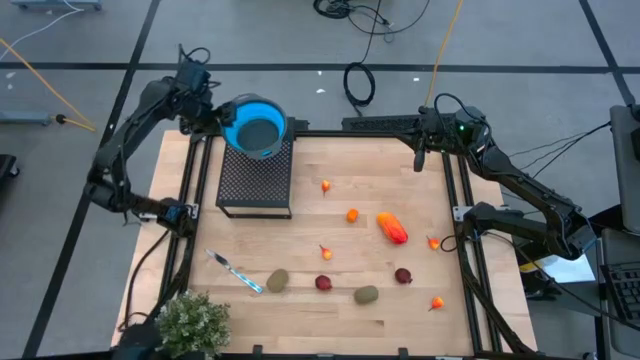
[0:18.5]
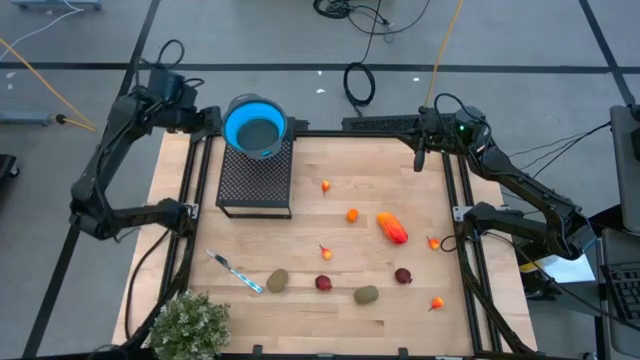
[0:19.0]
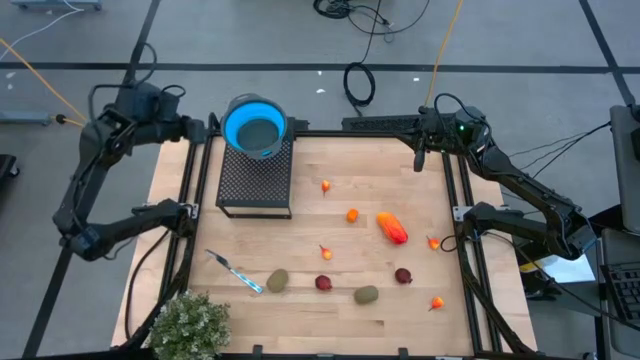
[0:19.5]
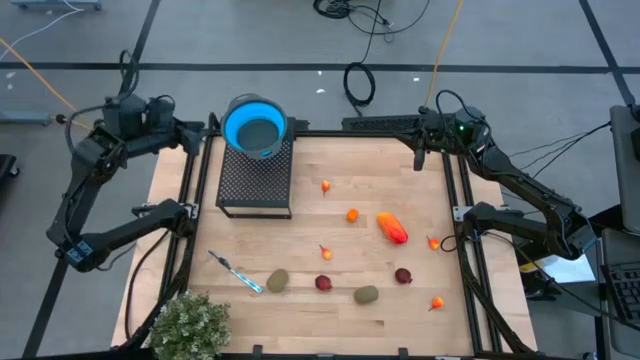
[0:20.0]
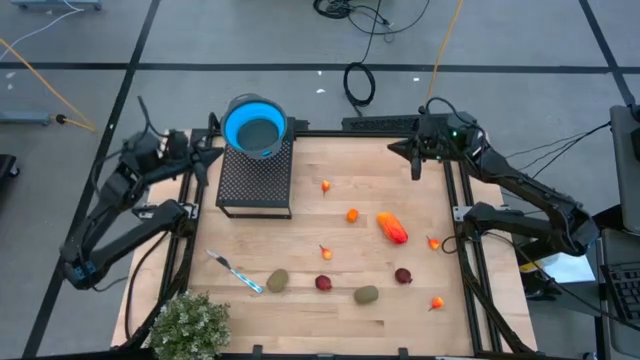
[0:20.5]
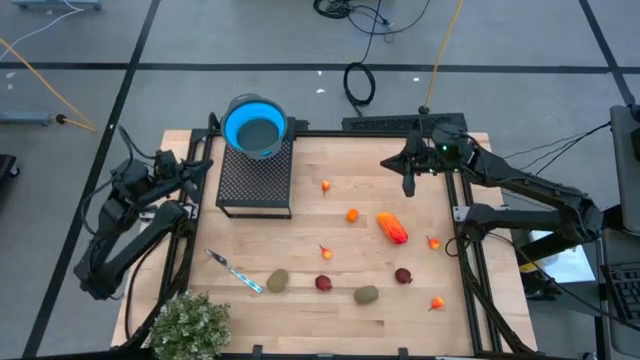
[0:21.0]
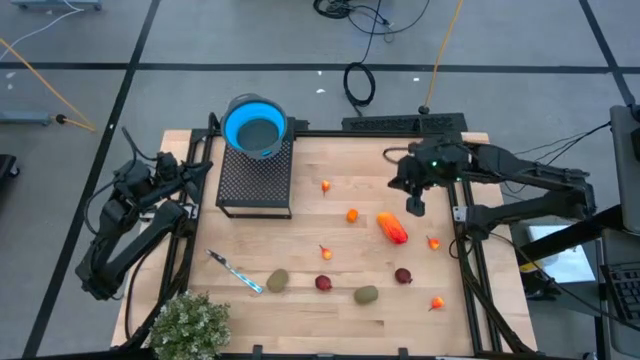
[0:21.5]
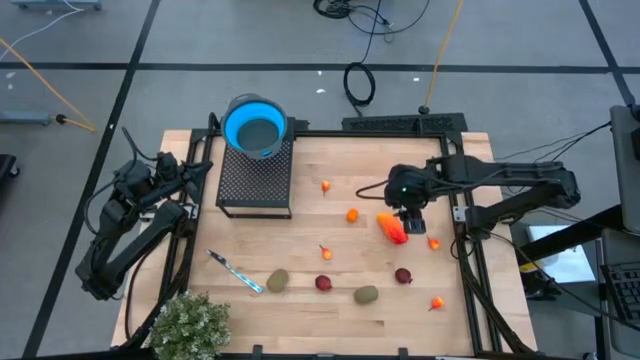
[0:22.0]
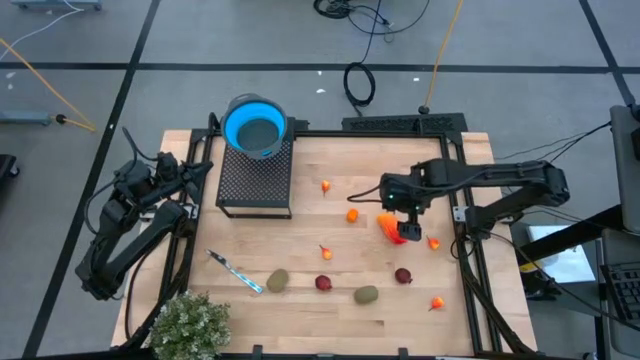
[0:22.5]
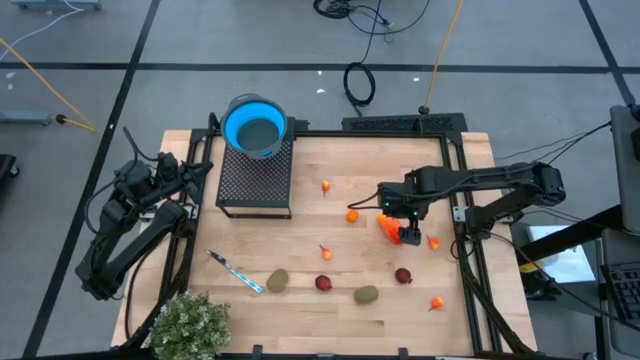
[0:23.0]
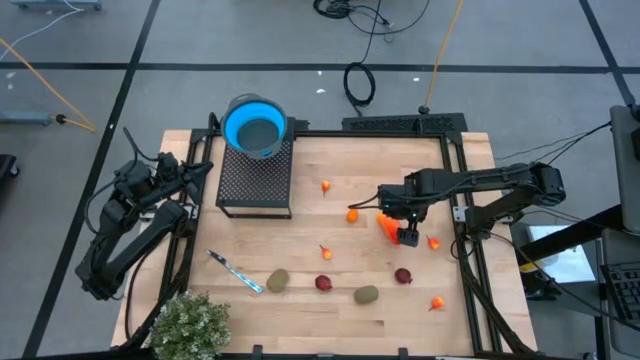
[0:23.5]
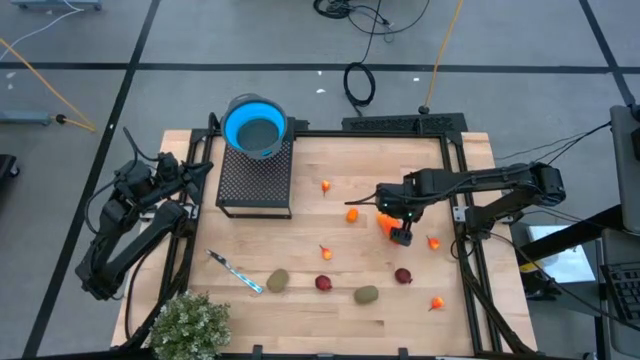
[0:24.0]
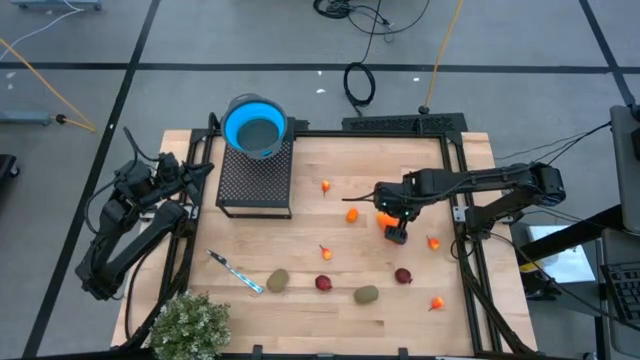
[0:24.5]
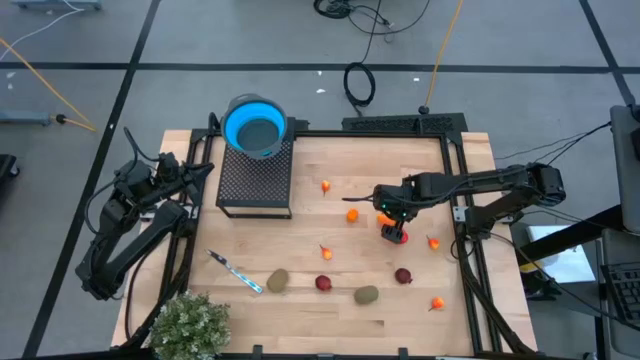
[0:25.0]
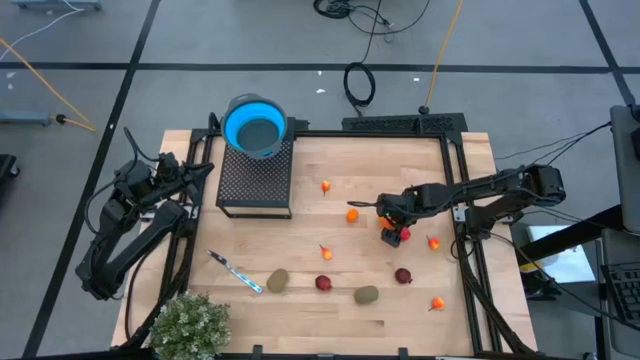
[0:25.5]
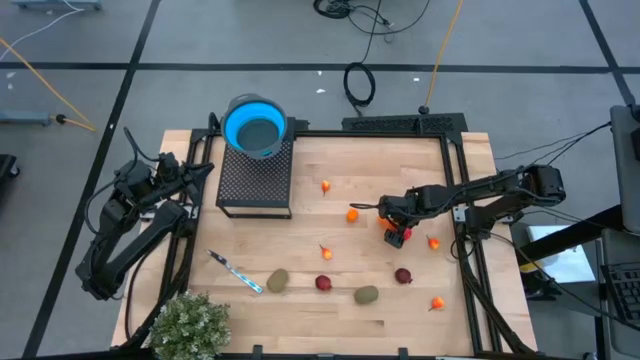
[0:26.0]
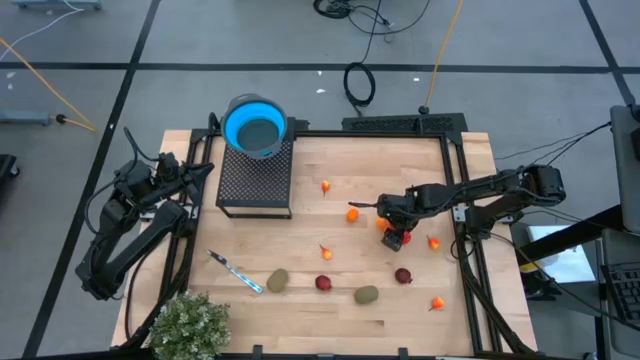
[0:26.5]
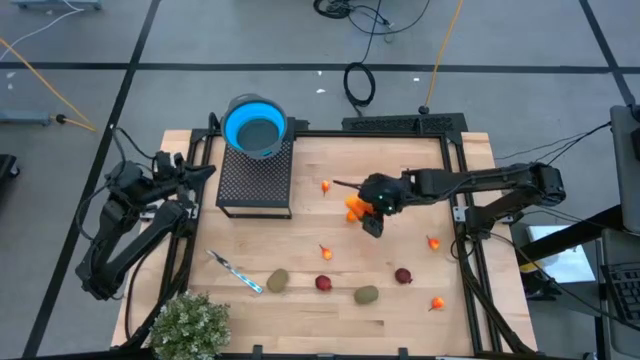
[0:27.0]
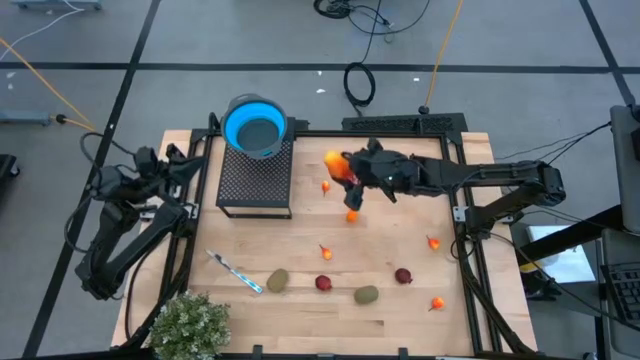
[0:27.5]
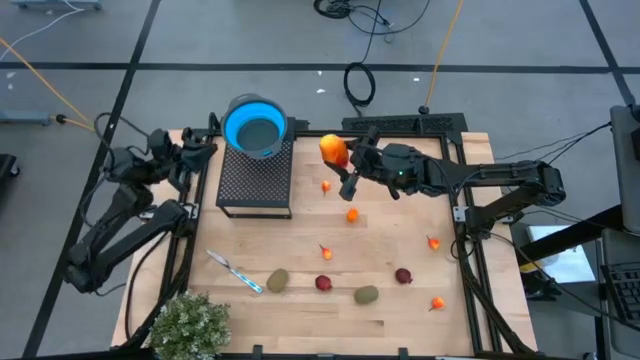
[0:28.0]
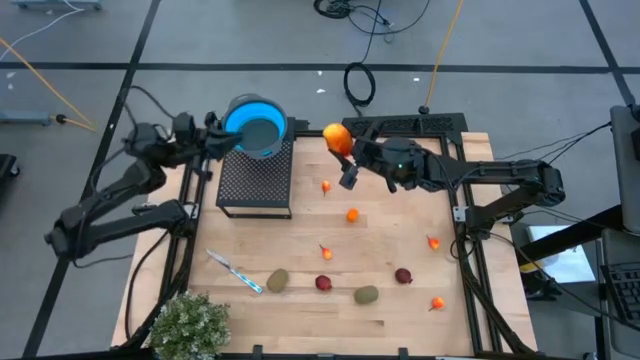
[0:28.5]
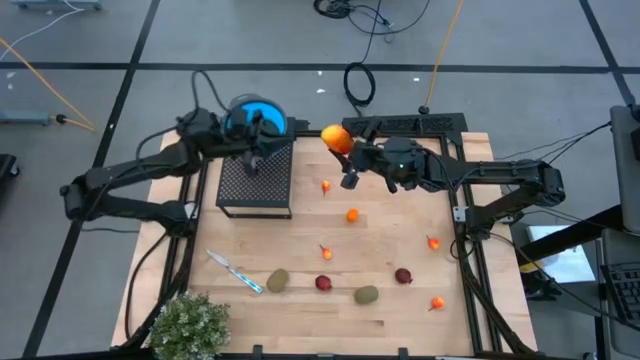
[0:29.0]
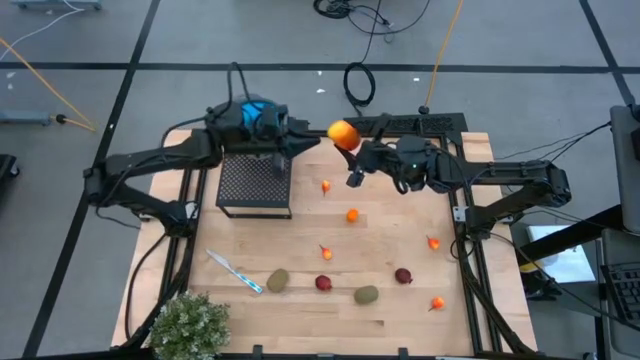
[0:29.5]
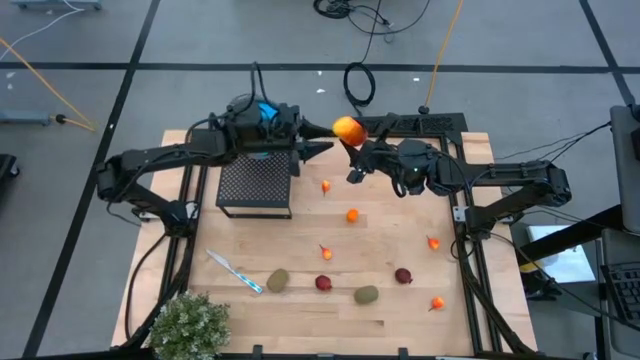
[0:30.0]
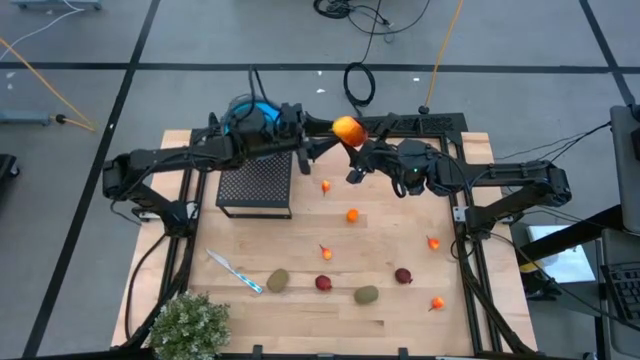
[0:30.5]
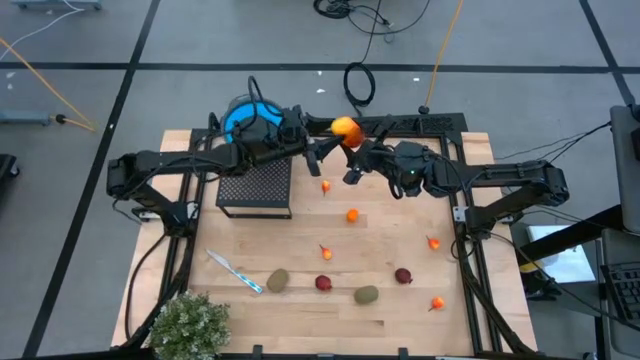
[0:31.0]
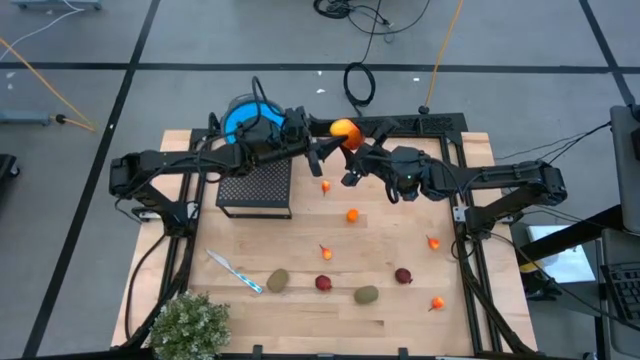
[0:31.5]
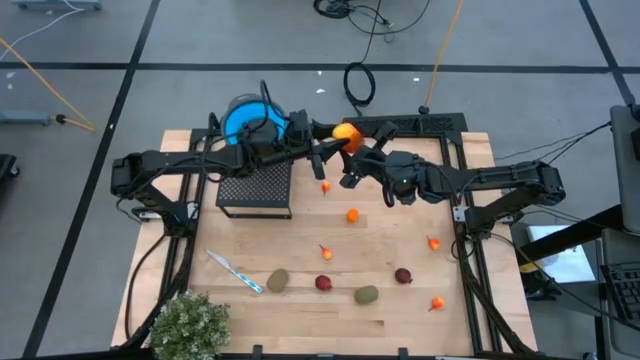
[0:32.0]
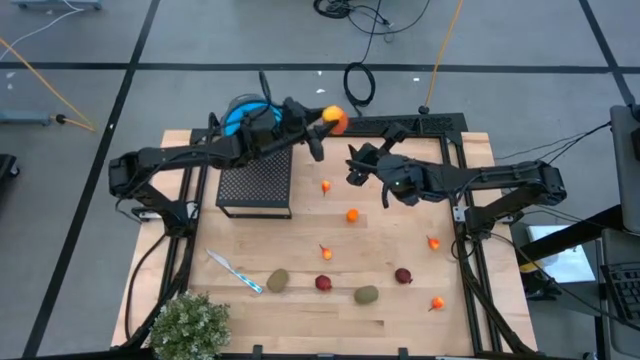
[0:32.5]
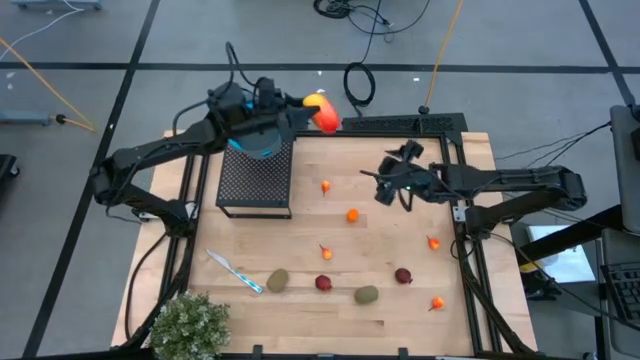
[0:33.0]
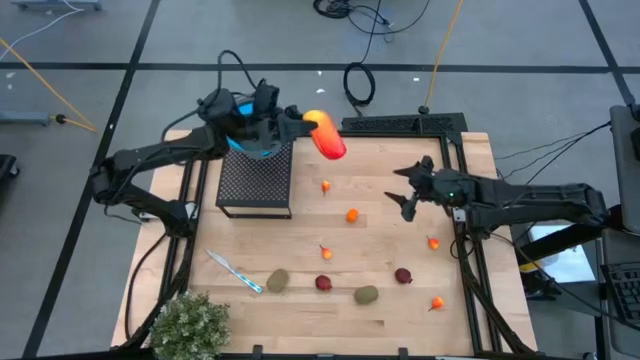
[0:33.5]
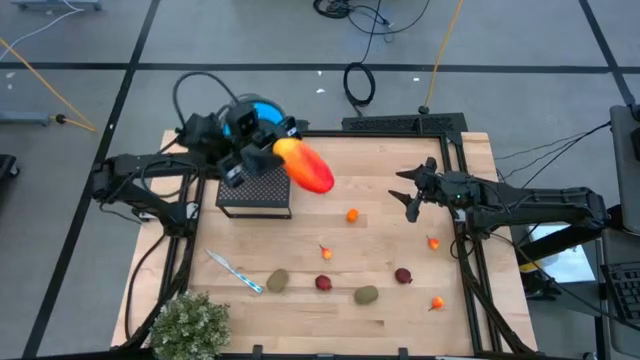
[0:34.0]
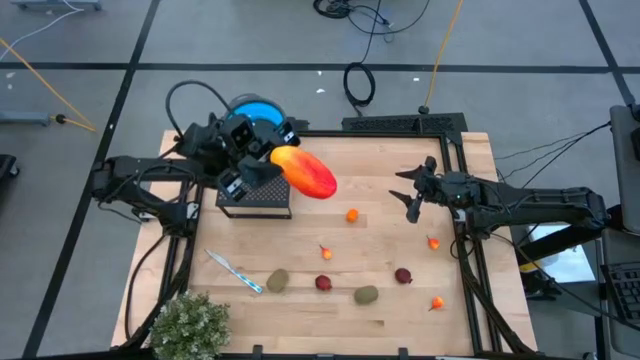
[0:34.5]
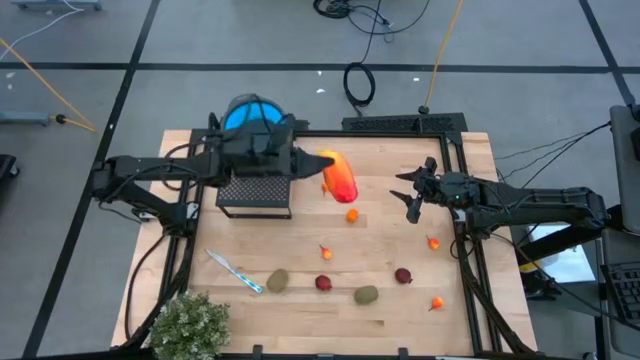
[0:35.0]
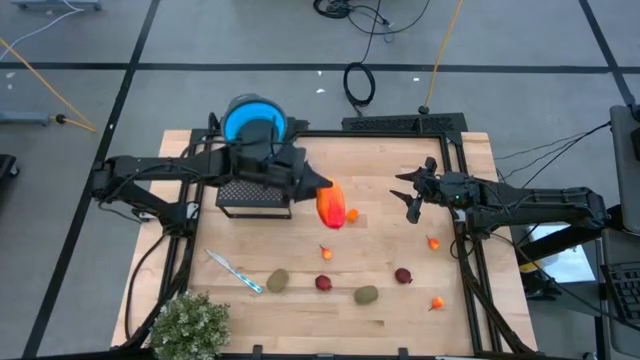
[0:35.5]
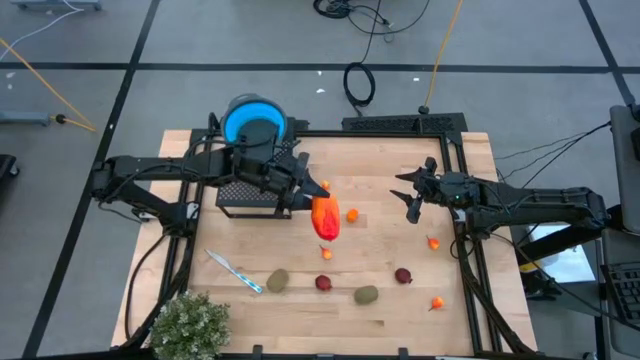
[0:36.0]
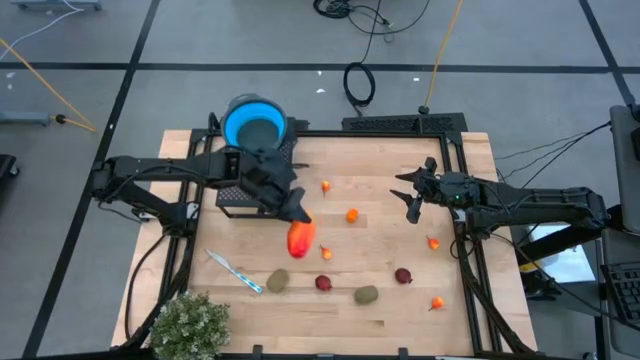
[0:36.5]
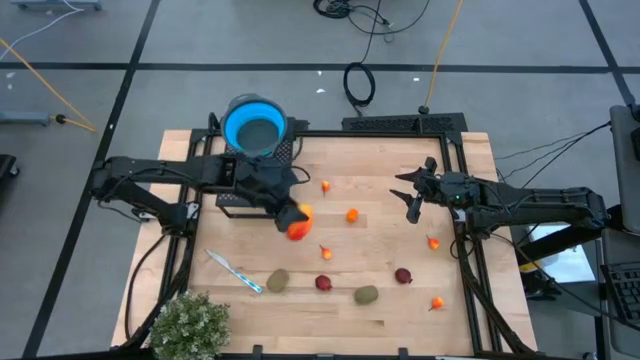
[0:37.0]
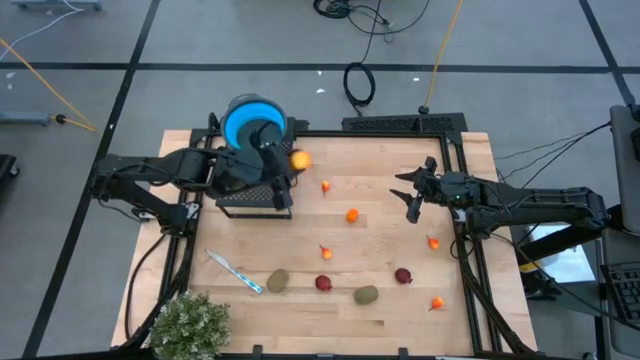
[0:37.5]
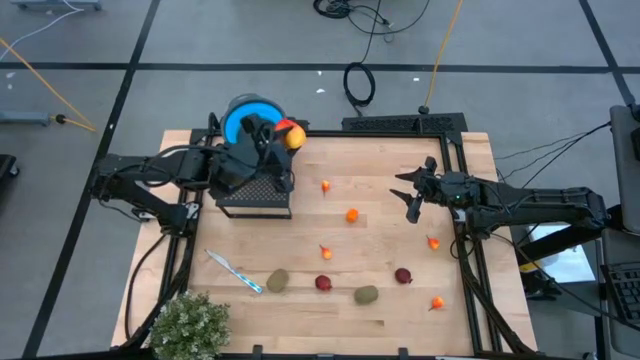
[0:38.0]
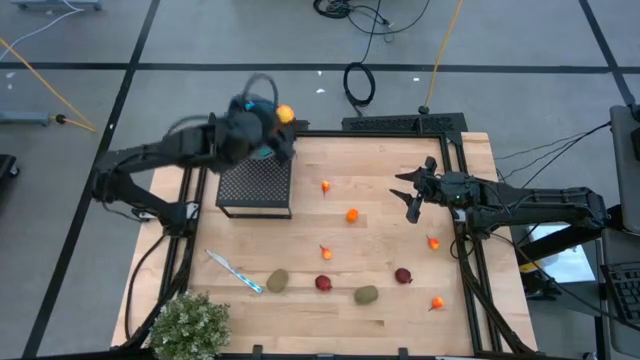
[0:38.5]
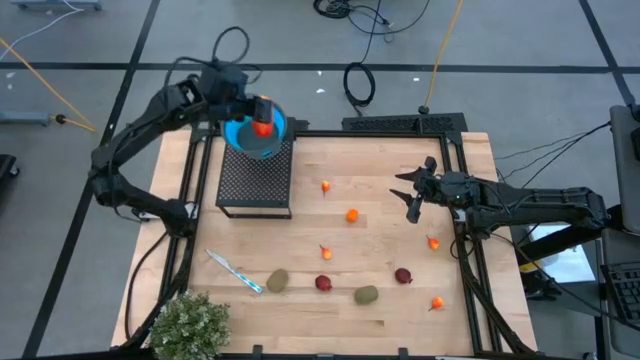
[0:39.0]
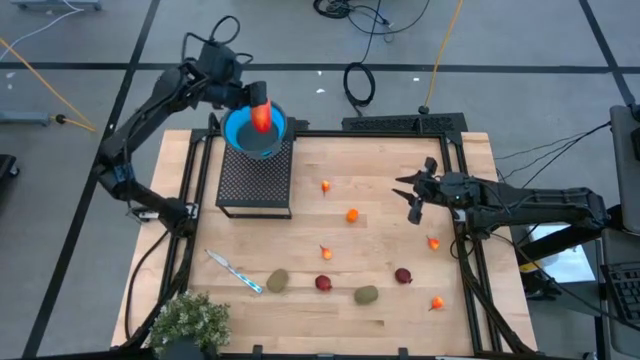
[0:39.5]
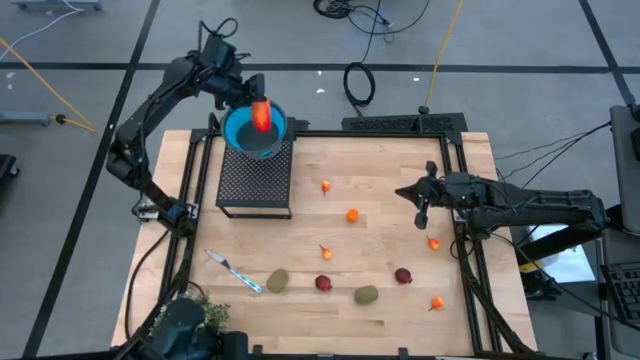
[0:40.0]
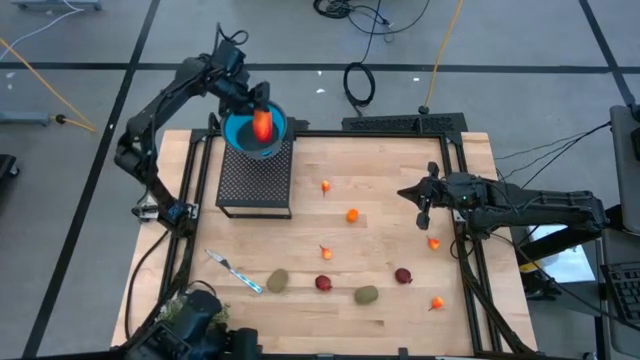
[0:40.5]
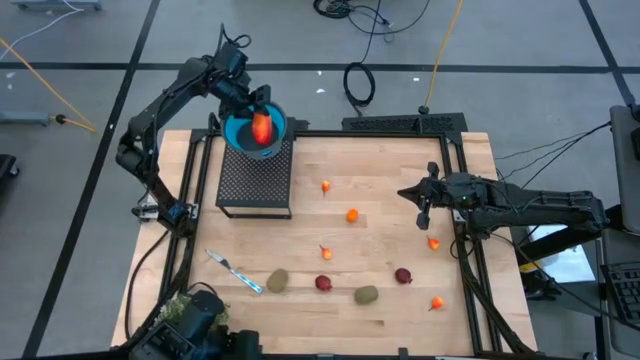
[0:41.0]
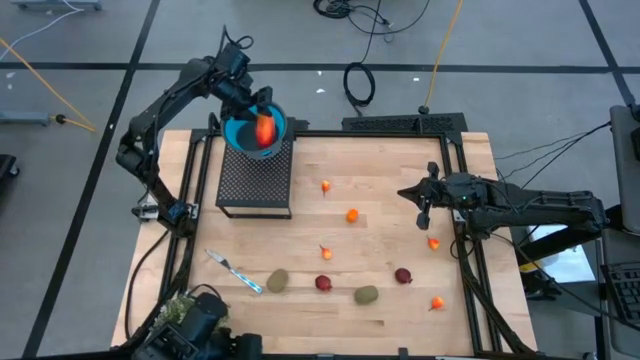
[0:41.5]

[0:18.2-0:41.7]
Task: Pick & Place Fruit
Put the mango into the blue strainer bowl on the shelf
